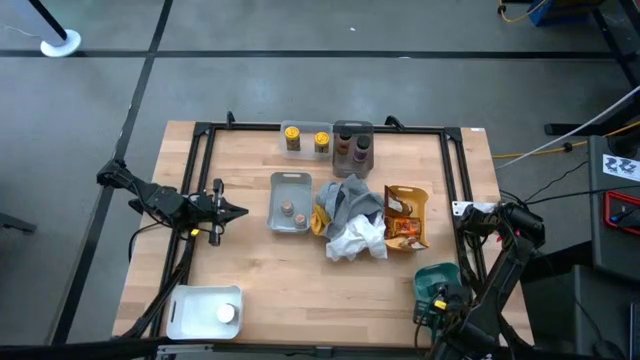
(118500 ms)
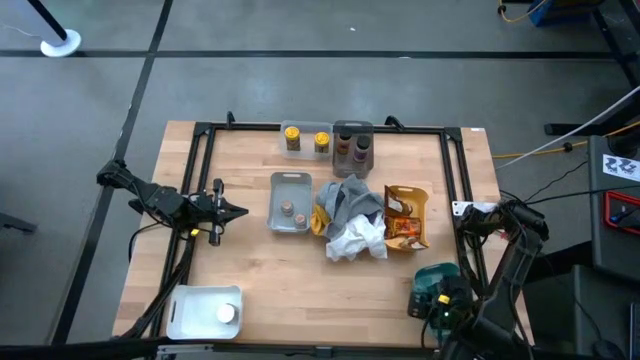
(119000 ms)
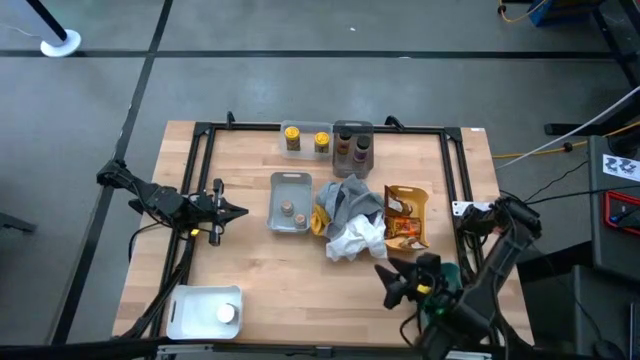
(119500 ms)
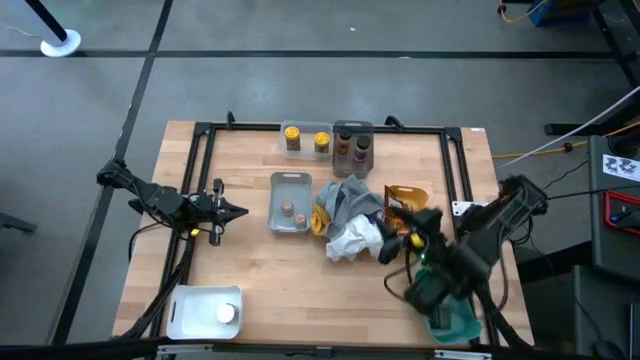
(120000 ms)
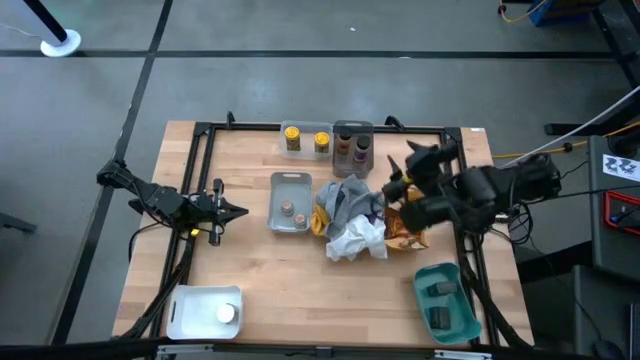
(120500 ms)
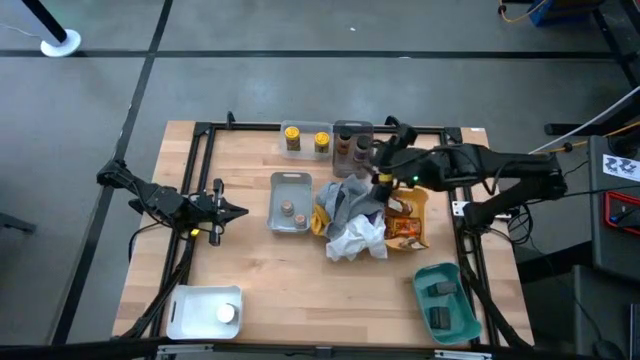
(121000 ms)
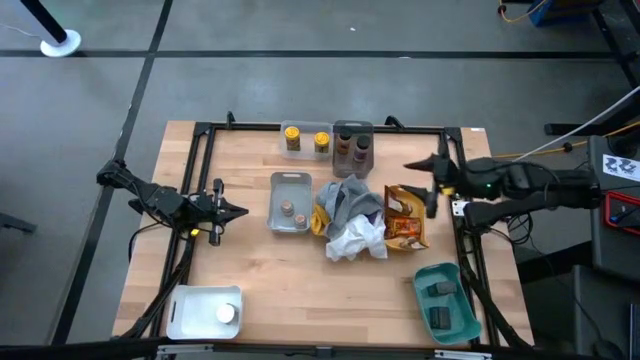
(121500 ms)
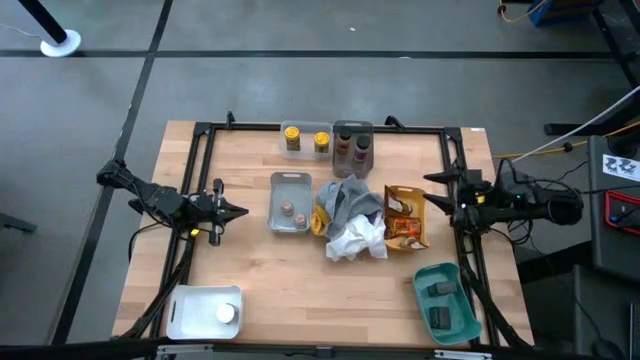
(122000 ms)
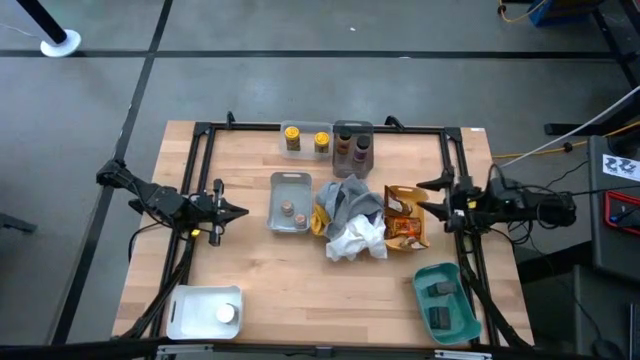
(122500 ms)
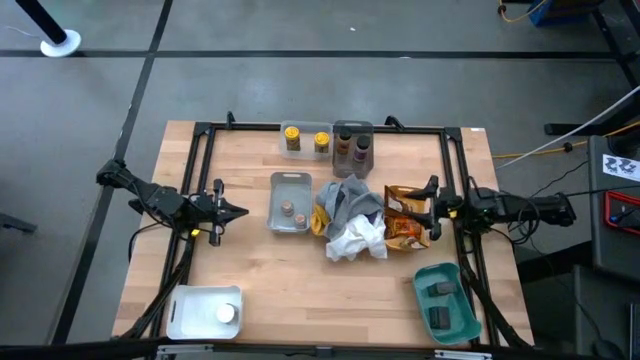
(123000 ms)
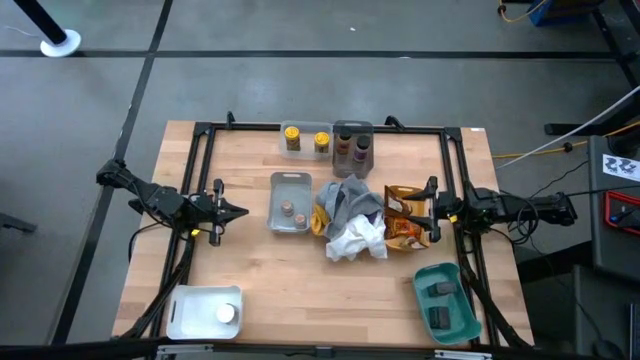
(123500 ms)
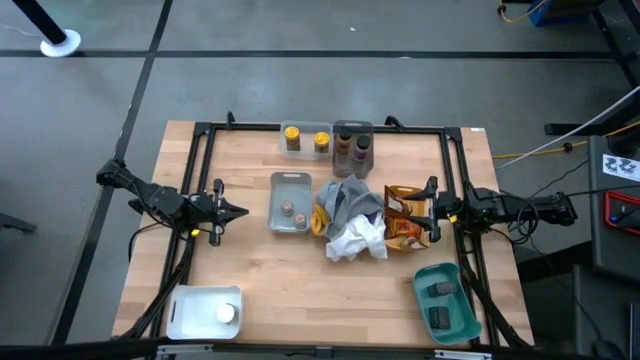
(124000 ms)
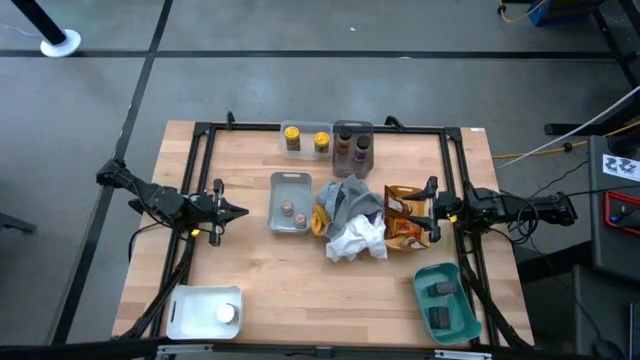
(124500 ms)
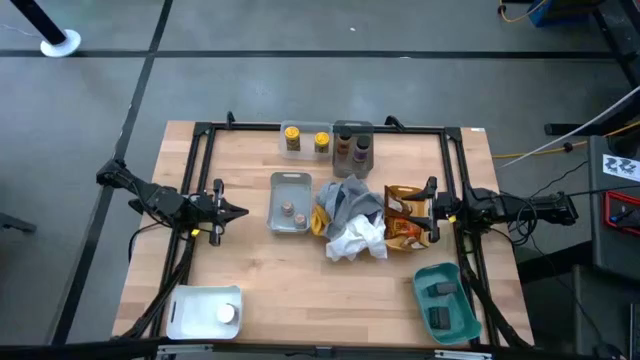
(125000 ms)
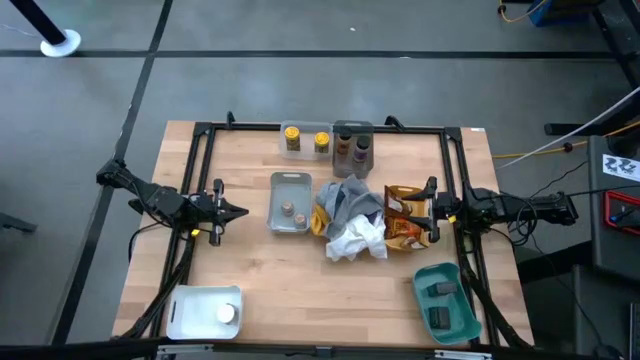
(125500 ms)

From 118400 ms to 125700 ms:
Task: Sort spices by type
Return to Home Position

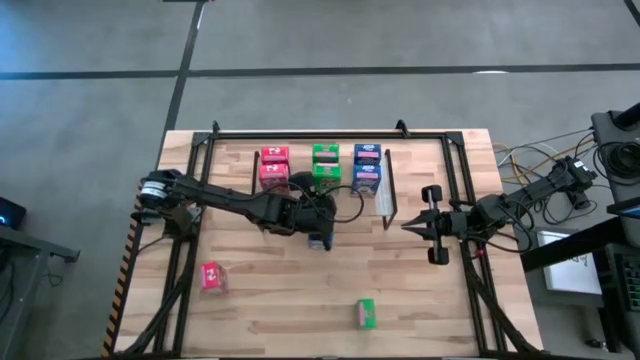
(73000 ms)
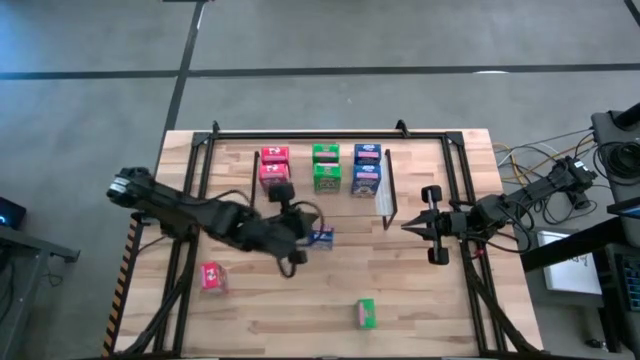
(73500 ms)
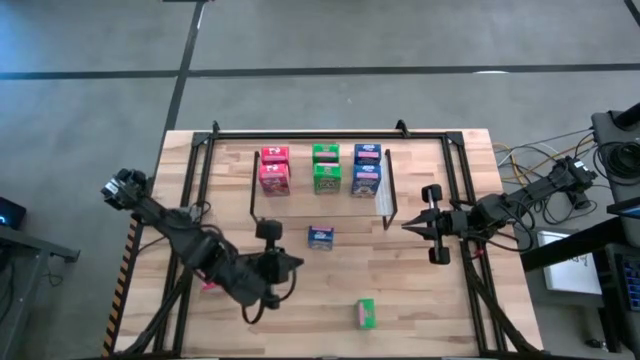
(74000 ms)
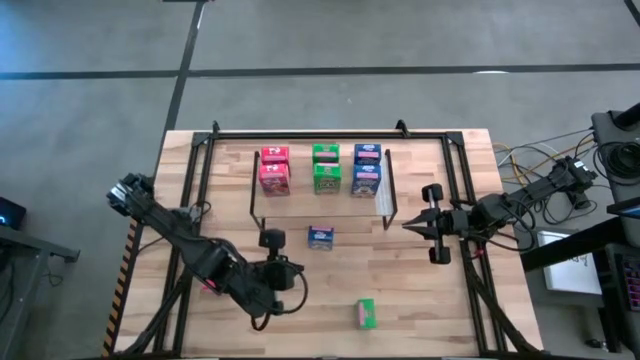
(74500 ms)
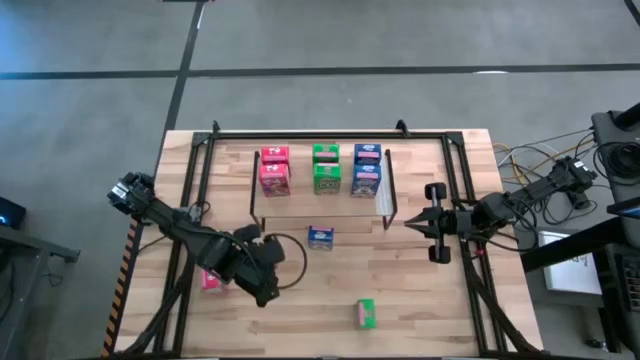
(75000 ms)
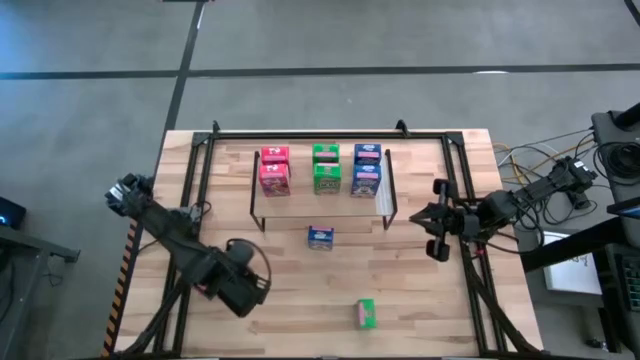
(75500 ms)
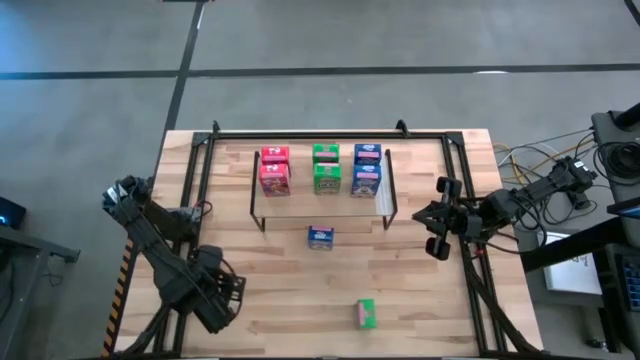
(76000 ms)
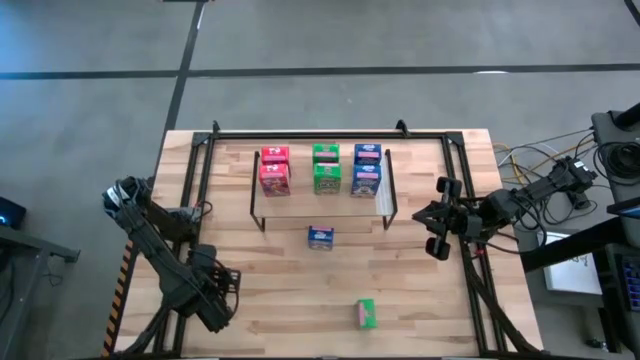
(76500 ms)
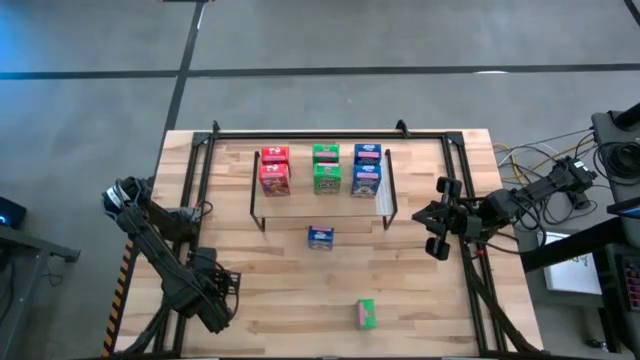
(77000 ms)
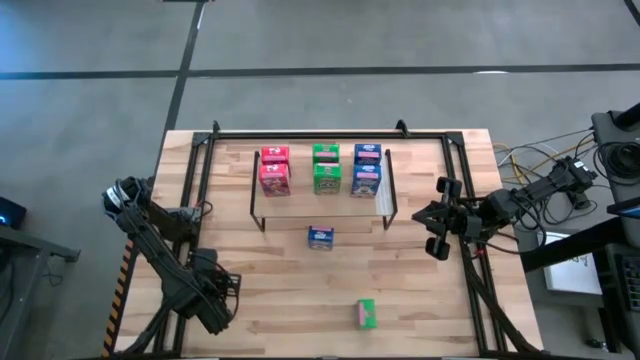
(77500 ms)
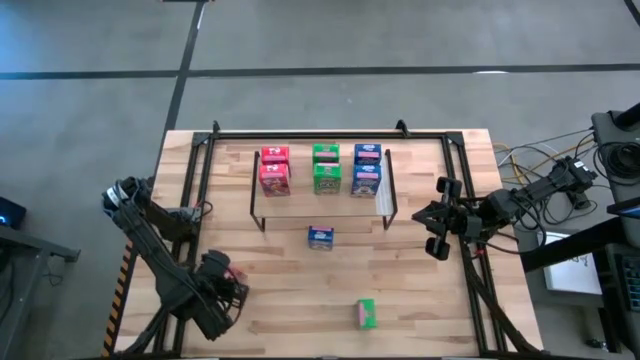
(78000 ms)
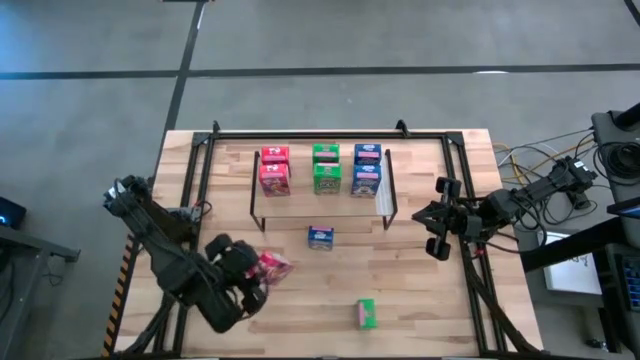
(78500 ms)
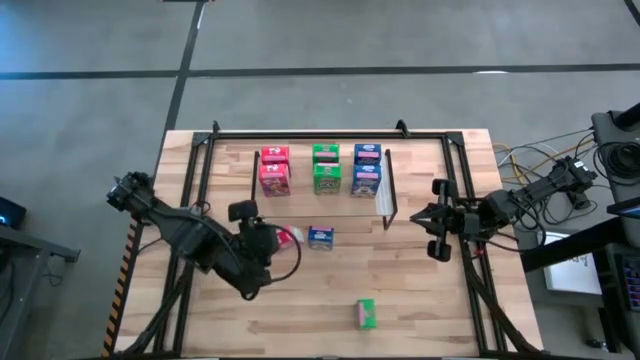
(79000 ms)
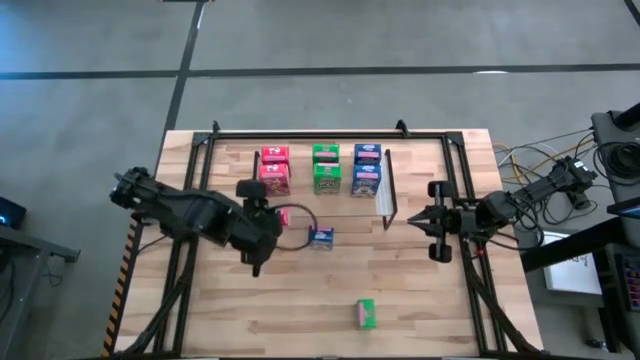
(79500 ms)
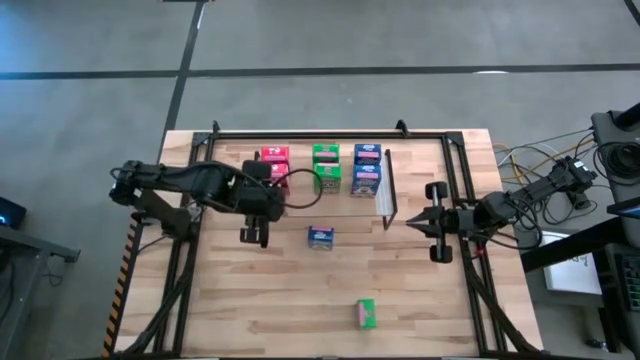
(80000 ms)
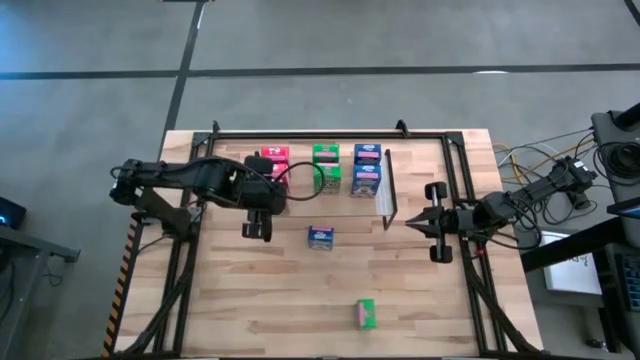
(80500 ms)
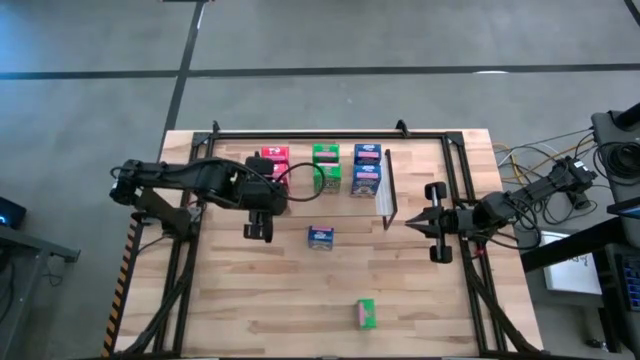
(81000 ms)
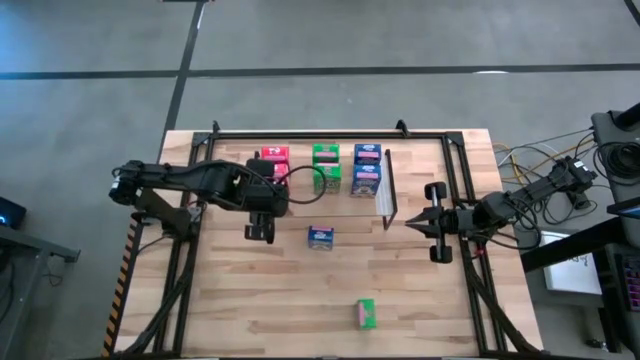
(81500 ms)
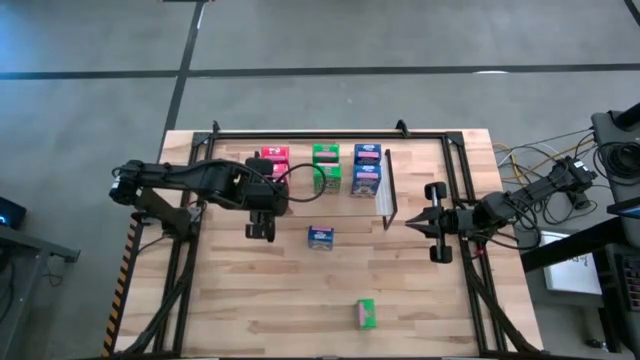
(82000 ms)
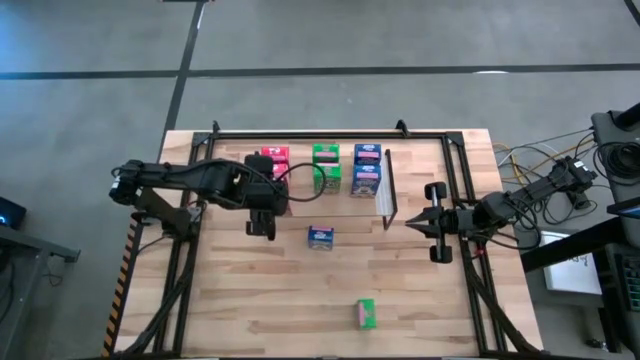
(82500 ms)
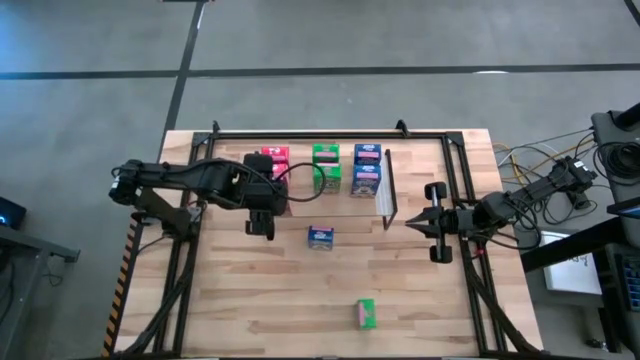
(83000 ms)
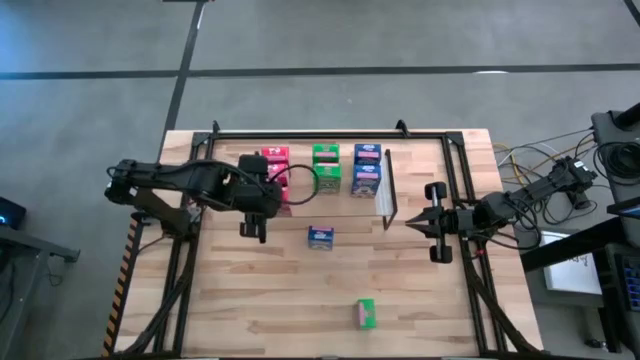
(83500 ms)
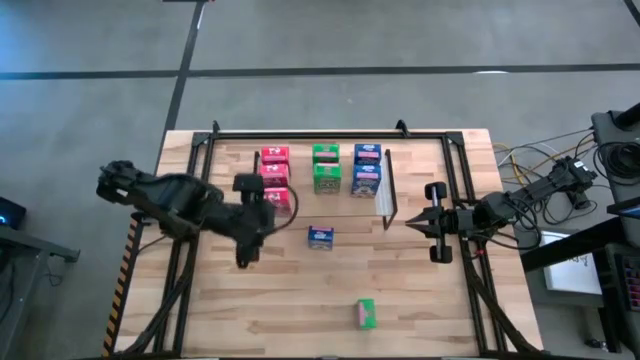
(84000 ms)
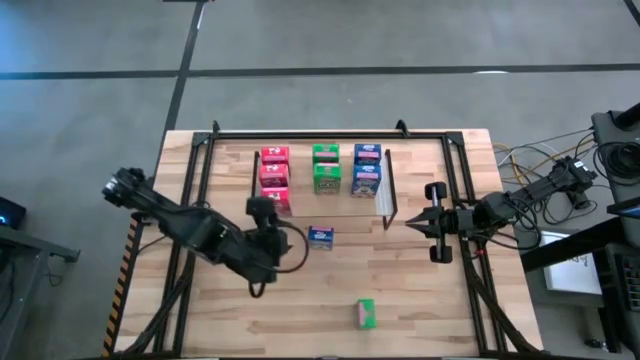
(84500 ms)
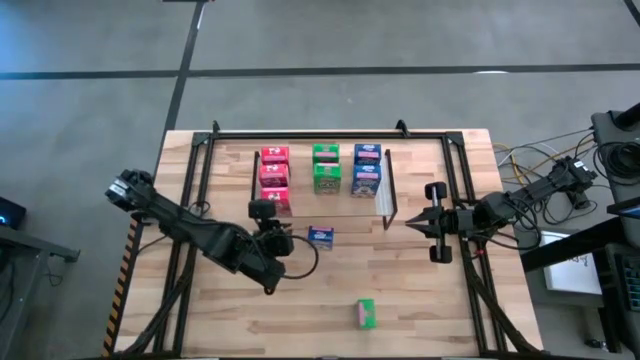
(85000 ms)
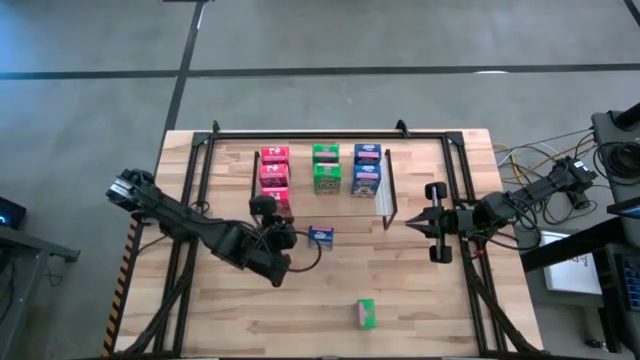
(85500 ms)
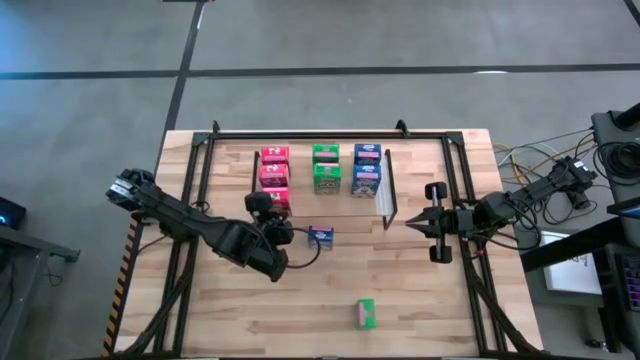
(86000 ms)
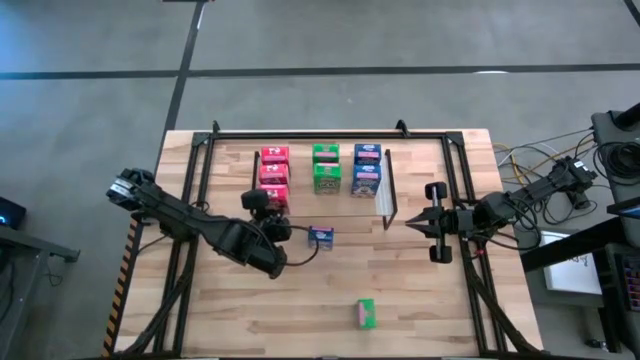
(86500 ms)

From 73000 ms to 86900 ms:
Task: Stack cereal on shelf
Put the left red cereal box on the shelf, aligned with the other red cereal boxes
